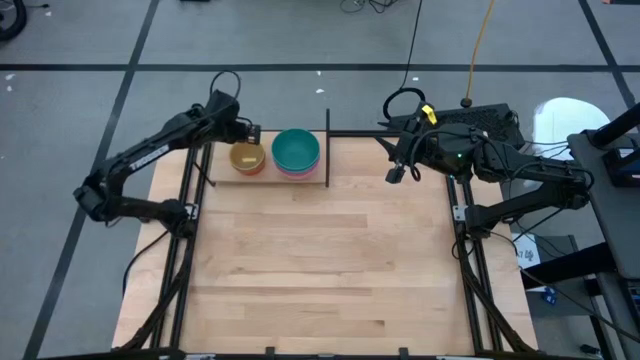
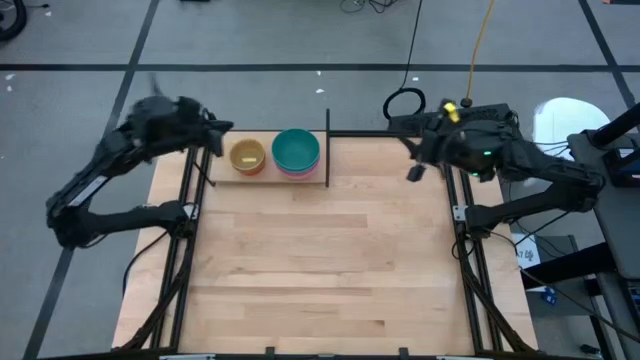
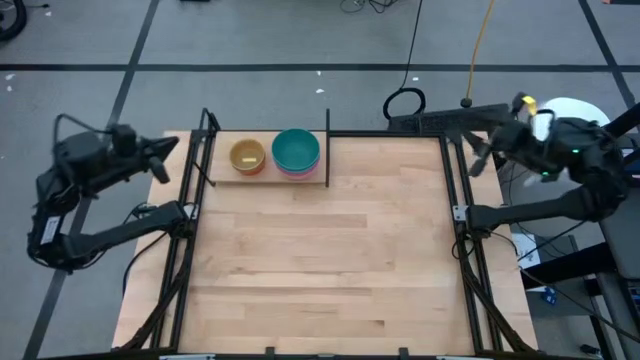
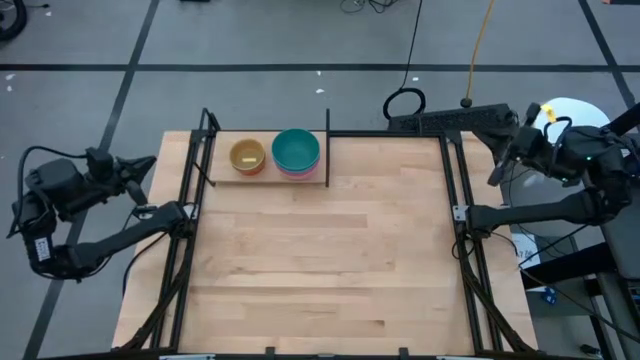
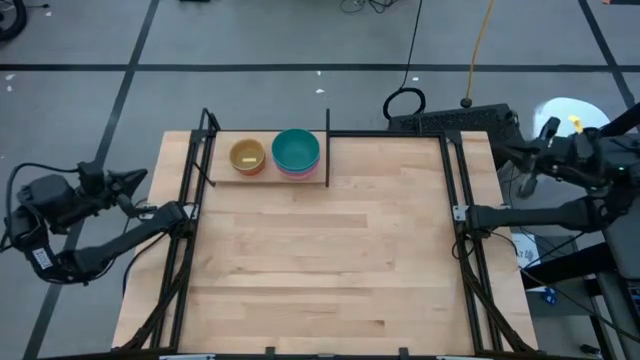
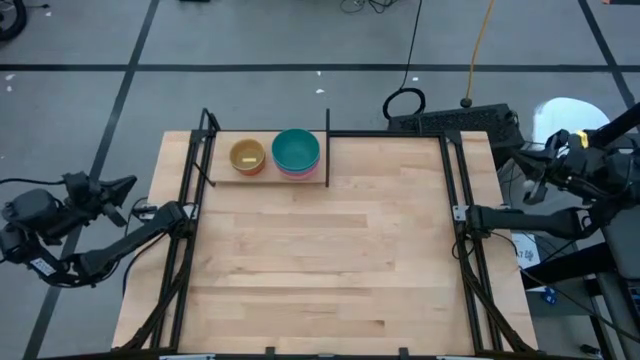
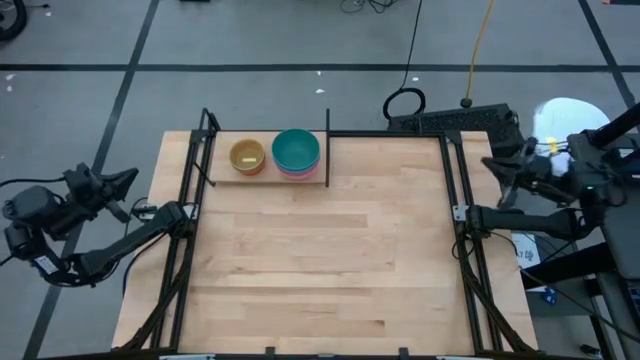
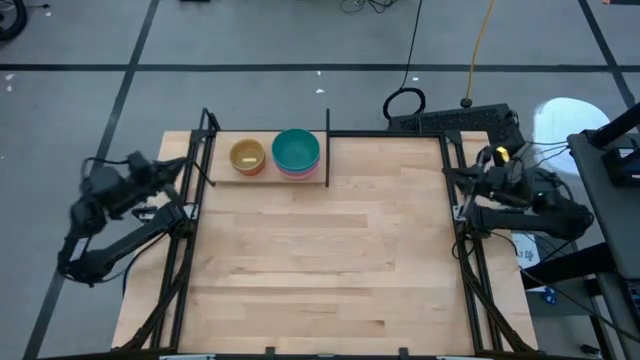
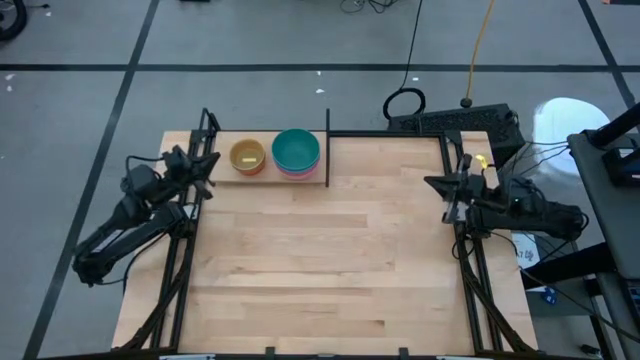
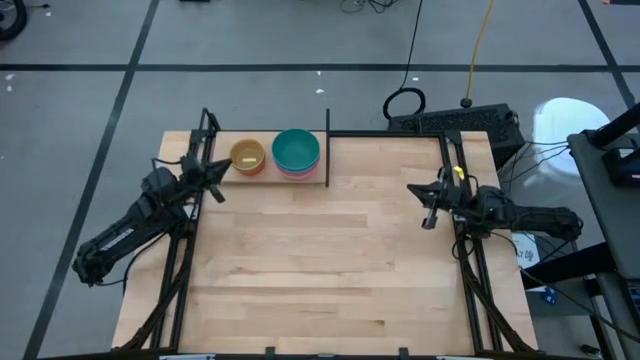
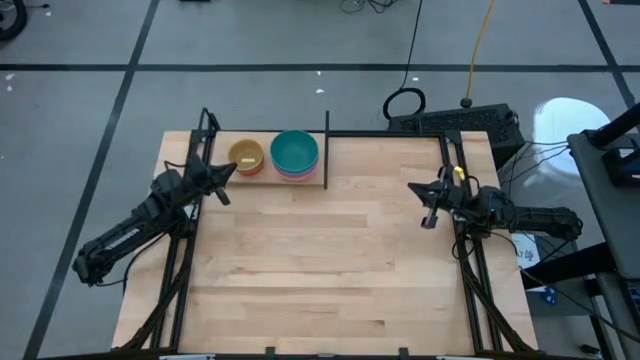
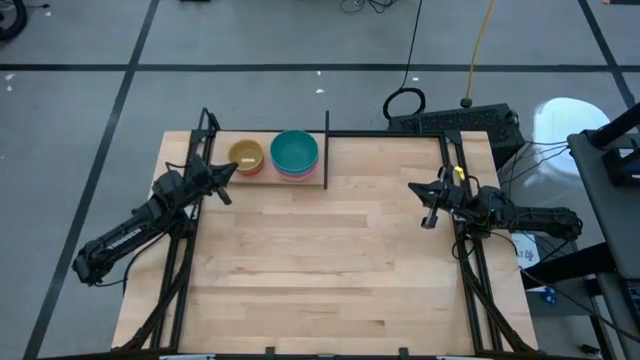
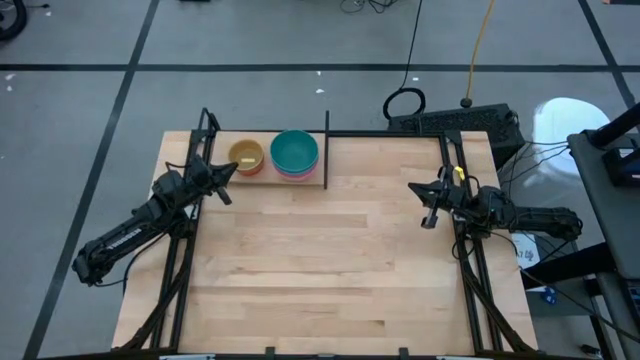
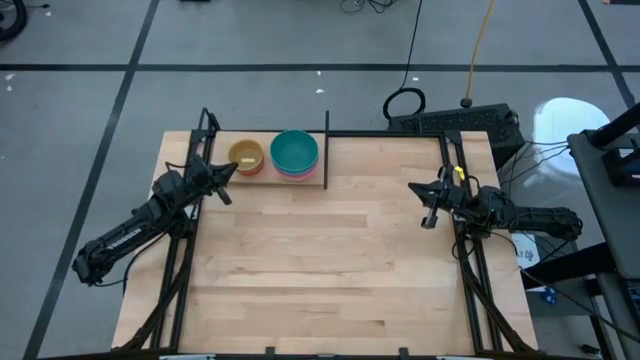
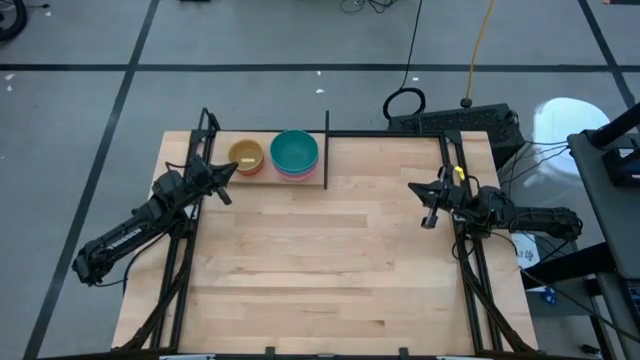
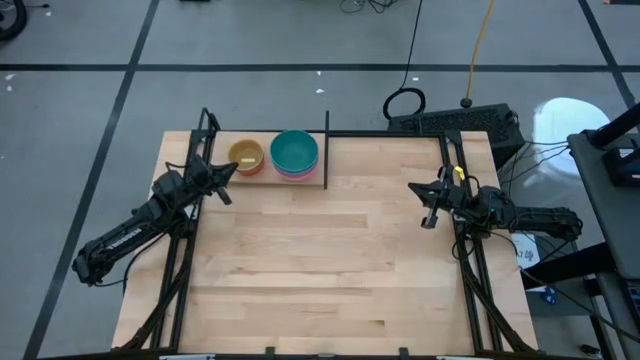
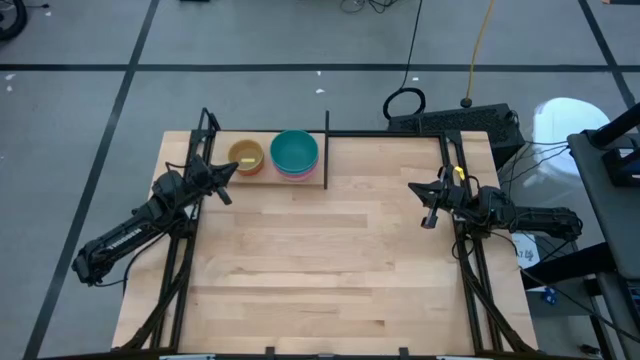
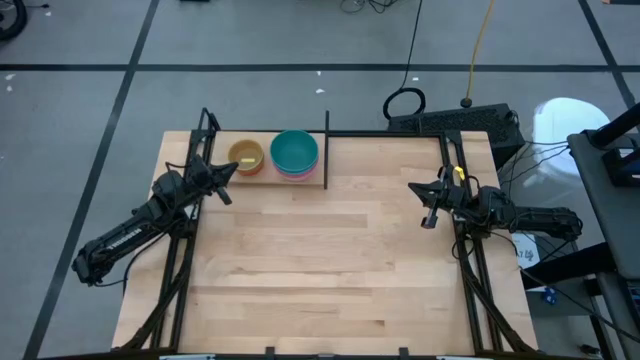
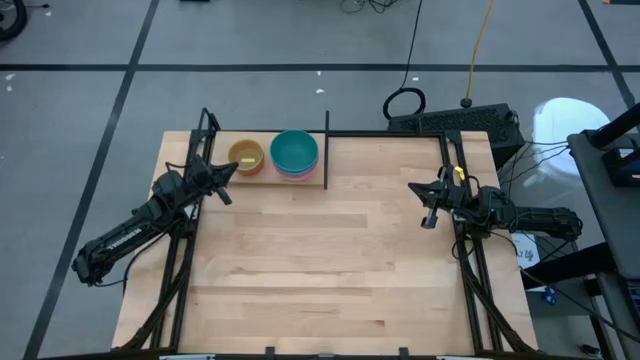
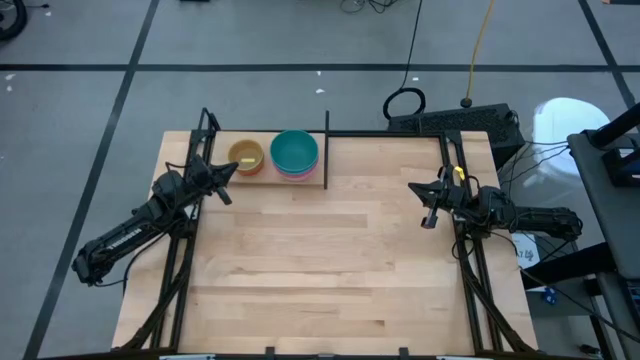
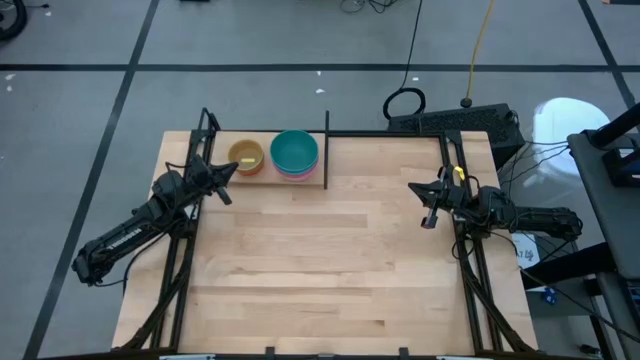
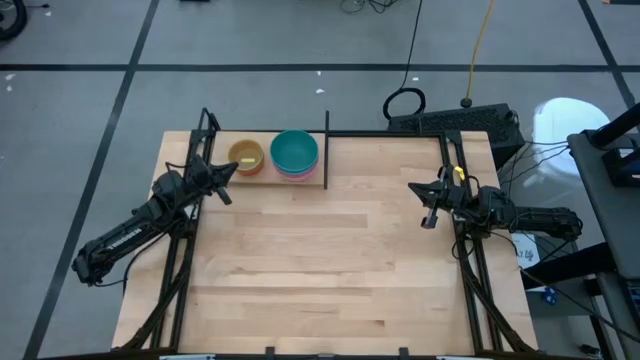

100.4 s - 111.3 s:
Task: Place and stack bowls onto a shelf
Return to Home Position

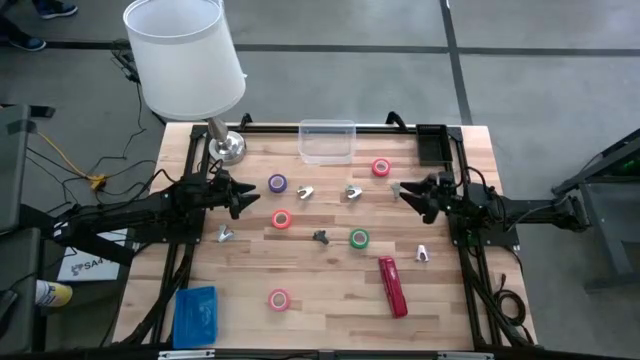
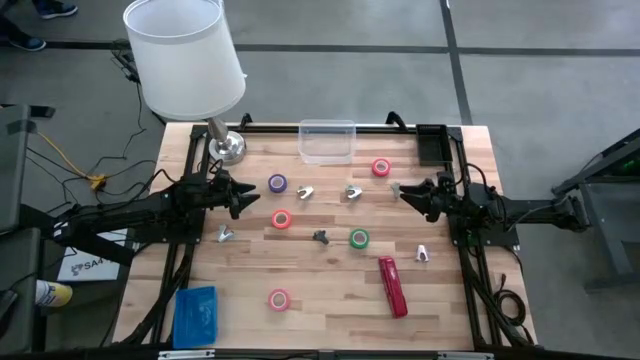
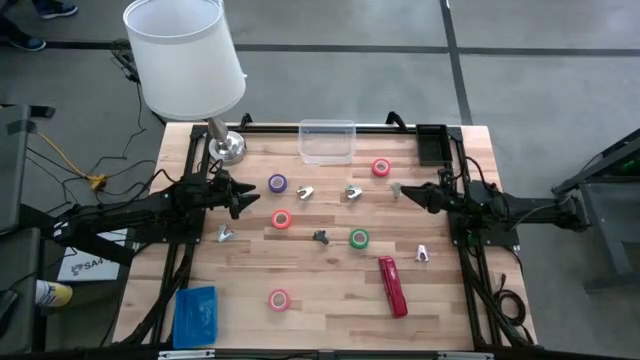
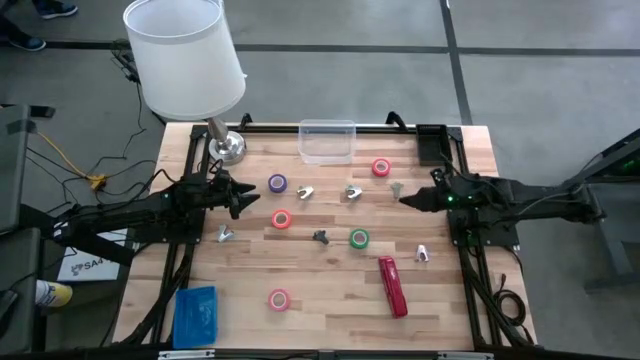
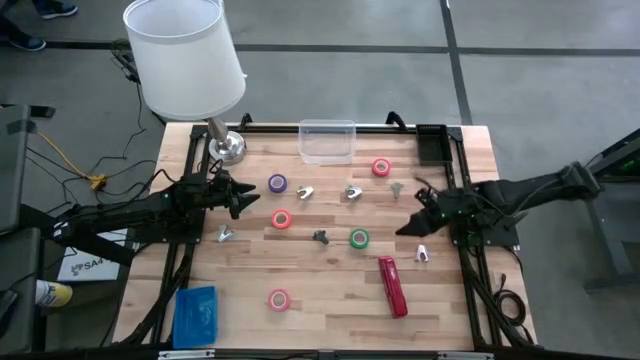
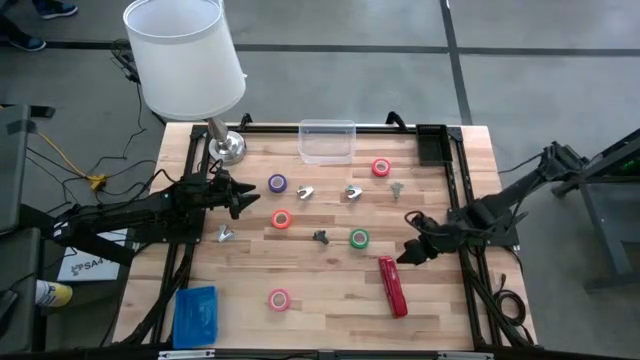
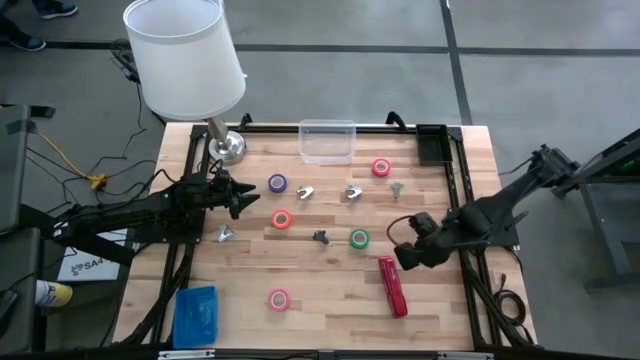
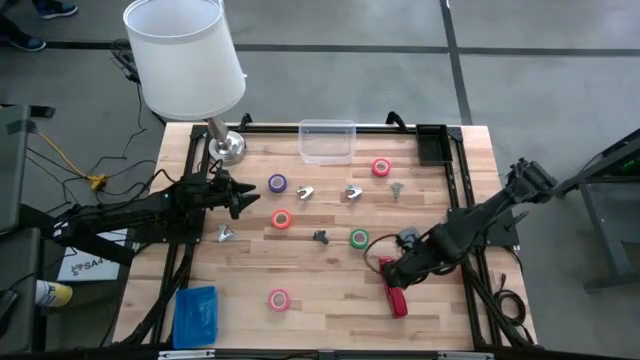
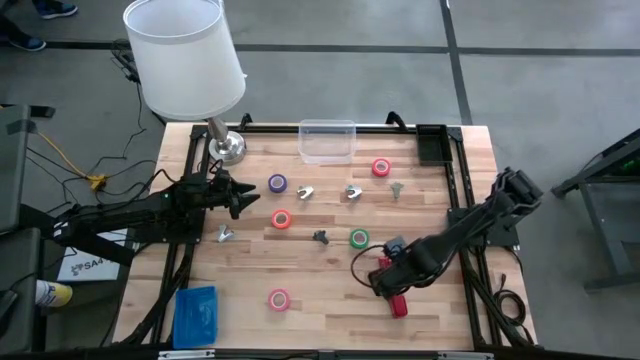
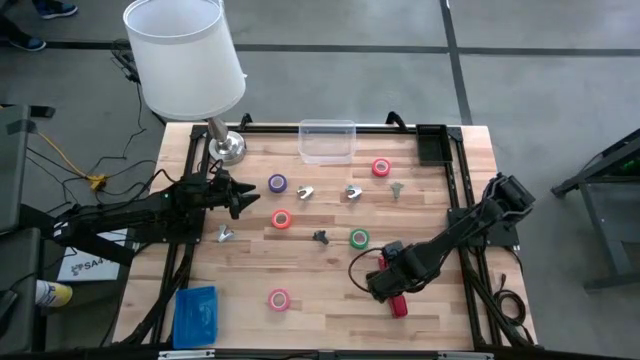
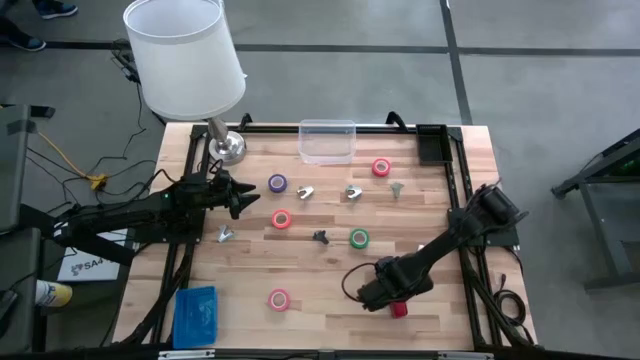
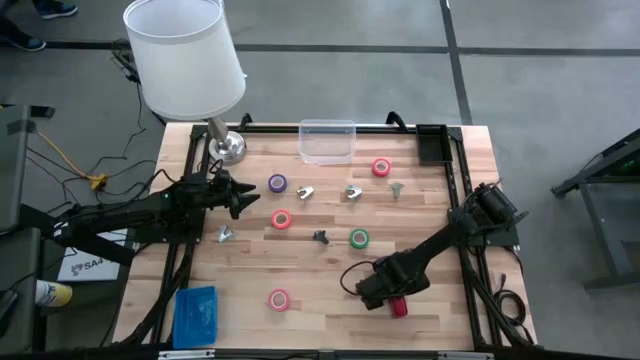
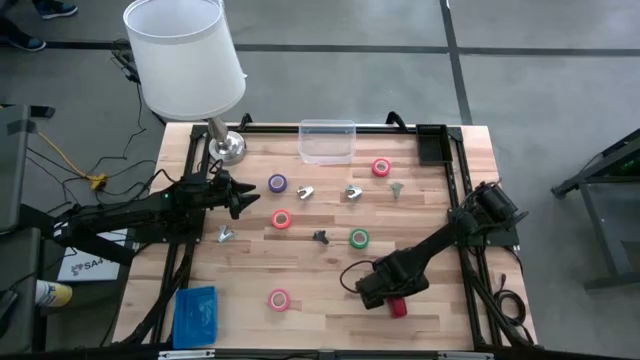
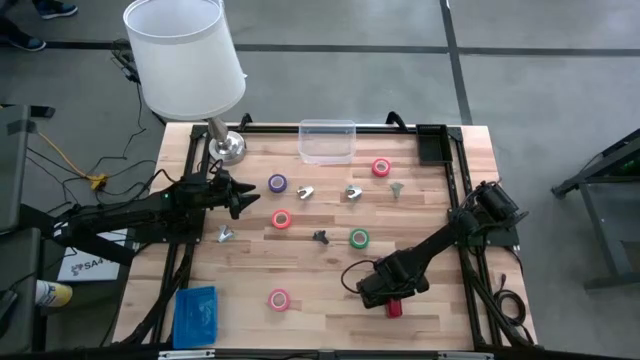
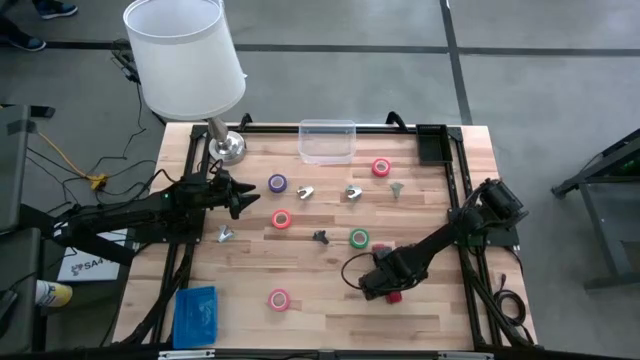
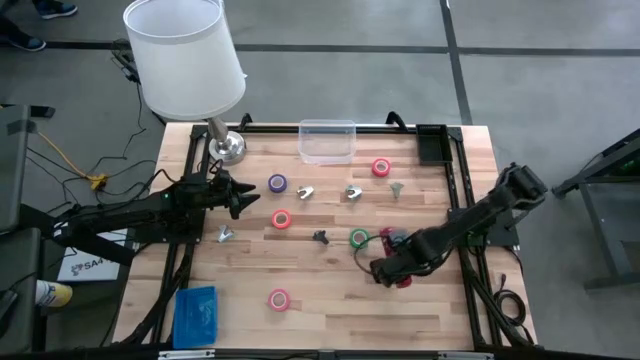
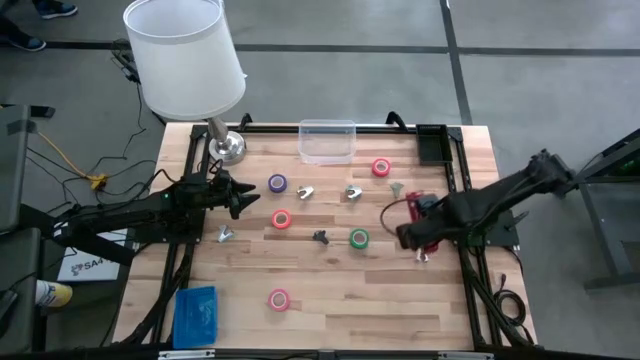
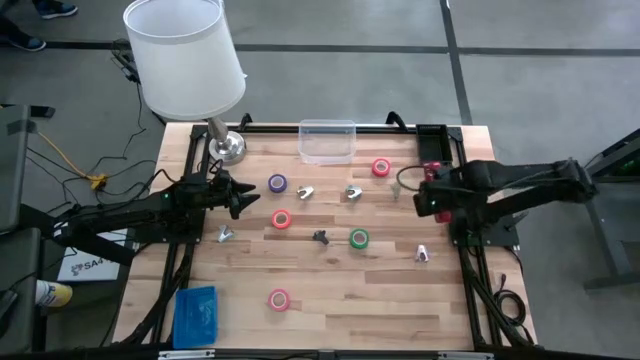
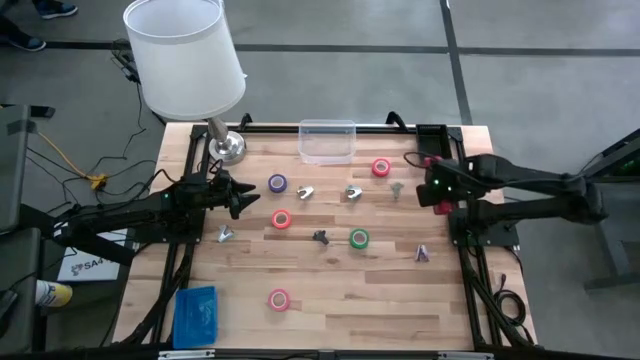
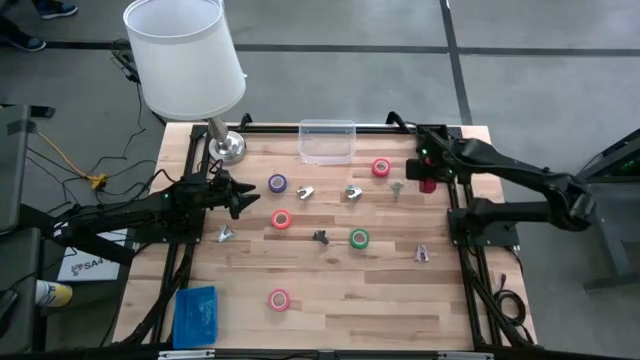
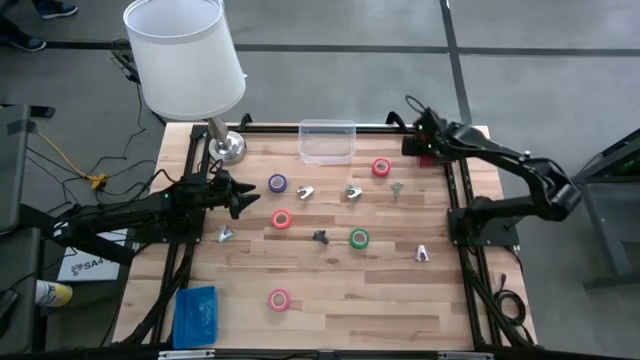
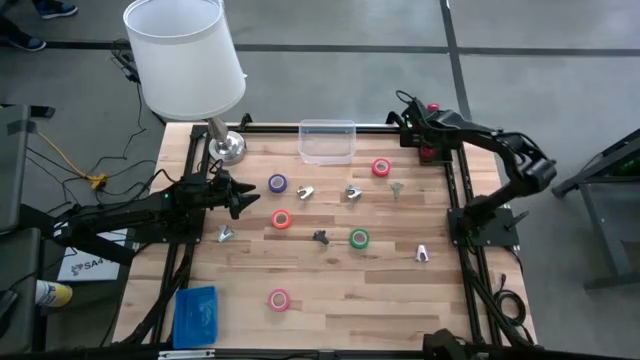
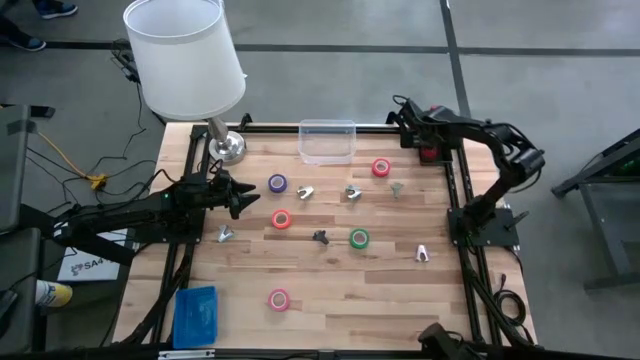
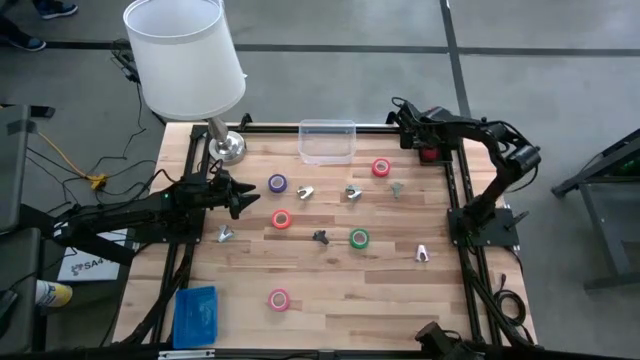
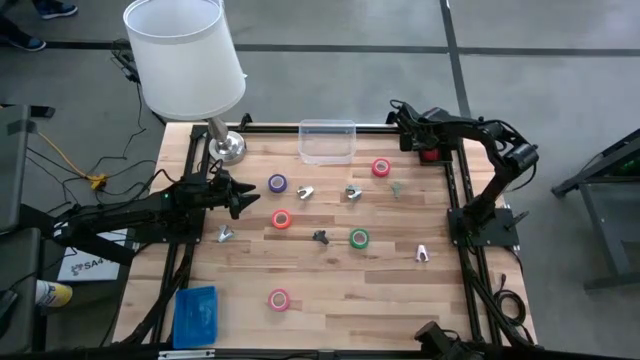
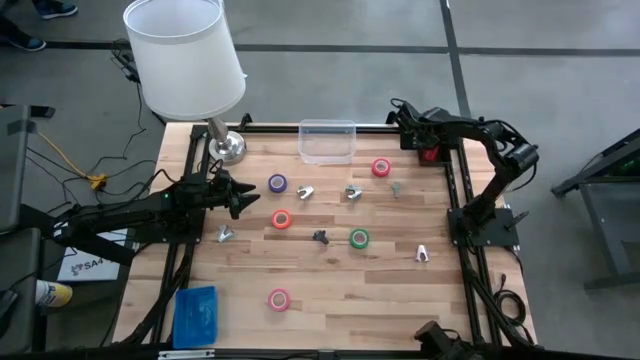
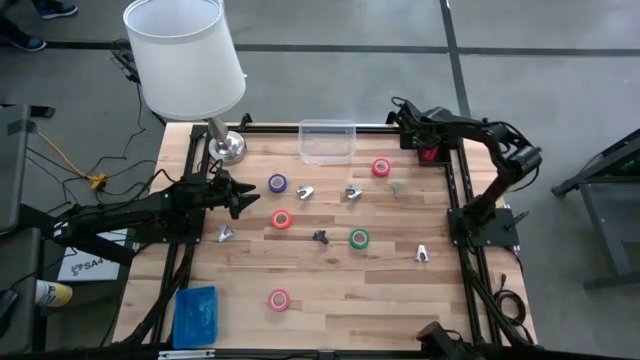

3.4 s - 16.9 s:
Task: Pick and place Stapler, Stapler remover, tape
Put the red stapler into the black bin
